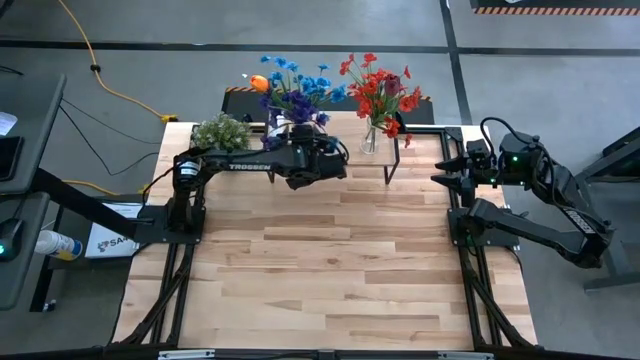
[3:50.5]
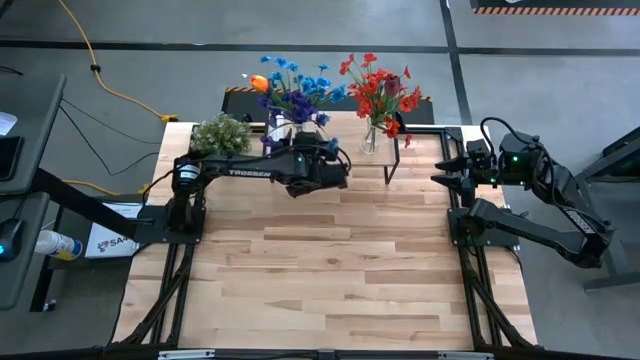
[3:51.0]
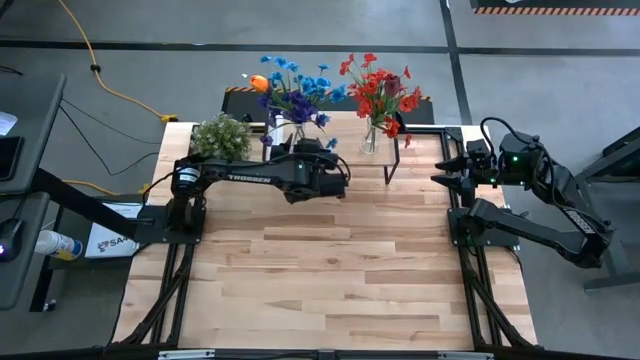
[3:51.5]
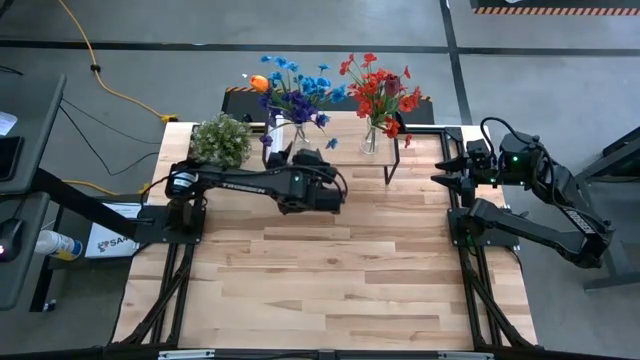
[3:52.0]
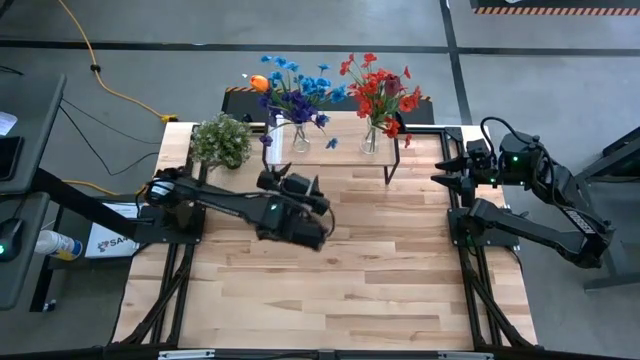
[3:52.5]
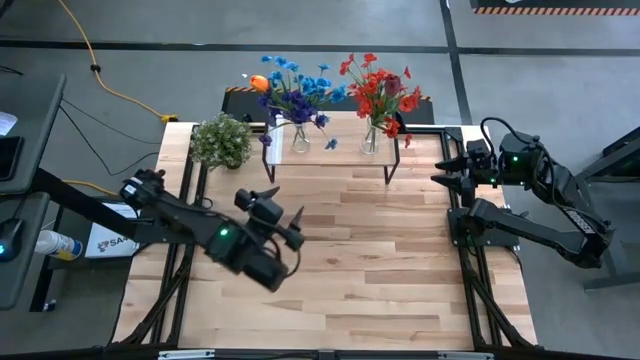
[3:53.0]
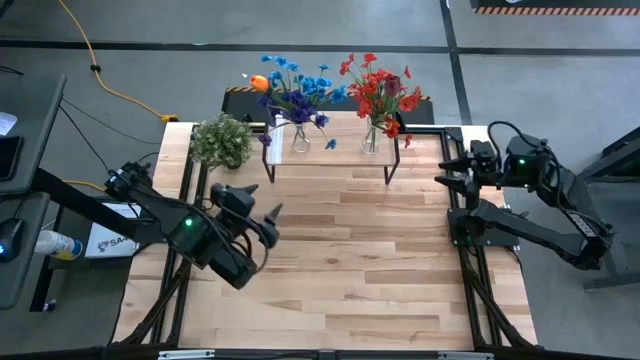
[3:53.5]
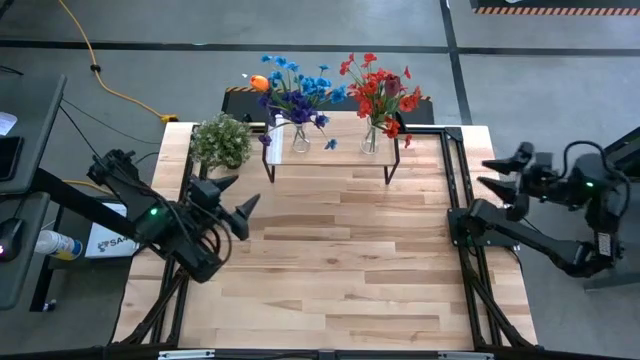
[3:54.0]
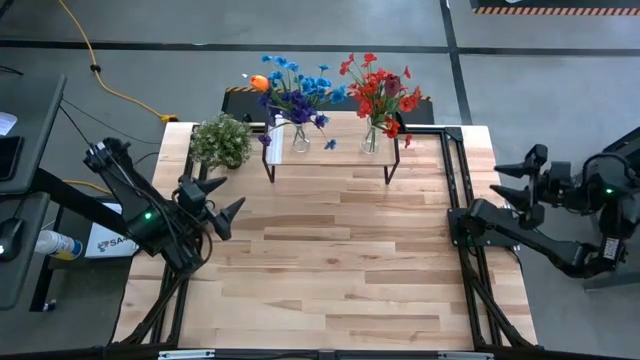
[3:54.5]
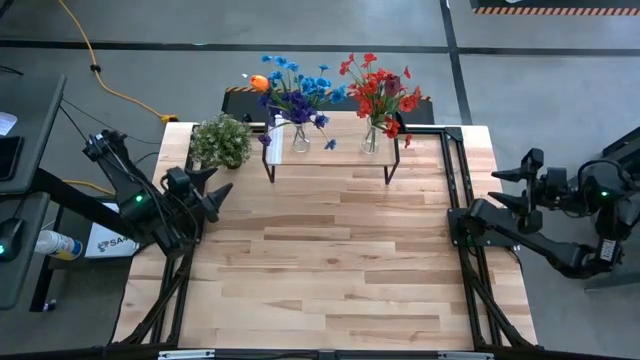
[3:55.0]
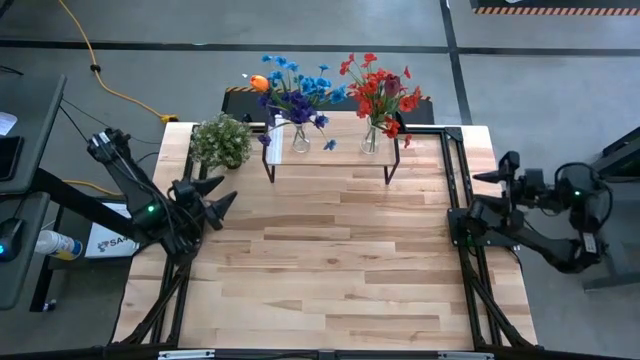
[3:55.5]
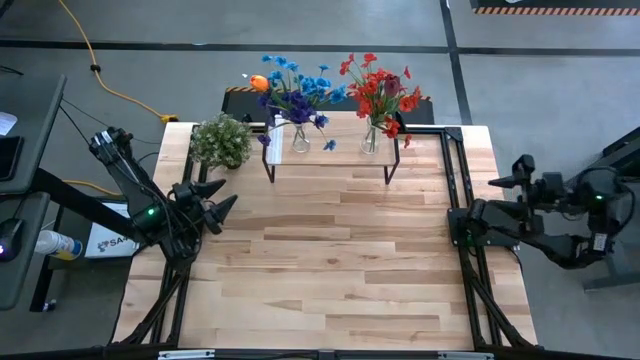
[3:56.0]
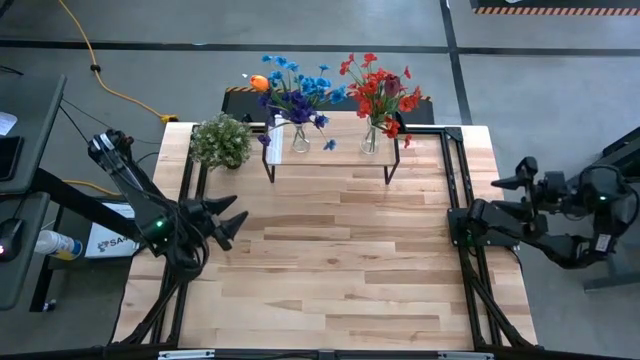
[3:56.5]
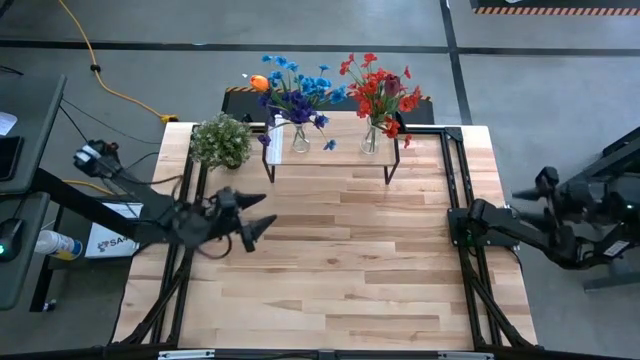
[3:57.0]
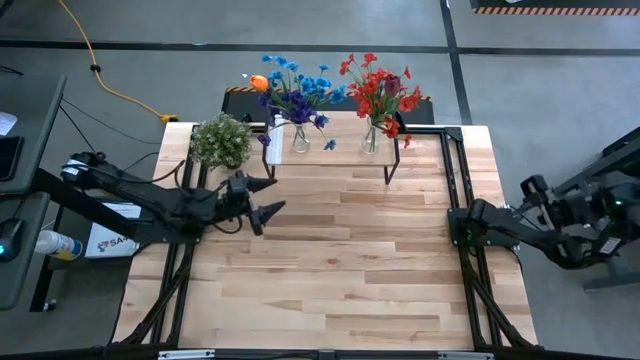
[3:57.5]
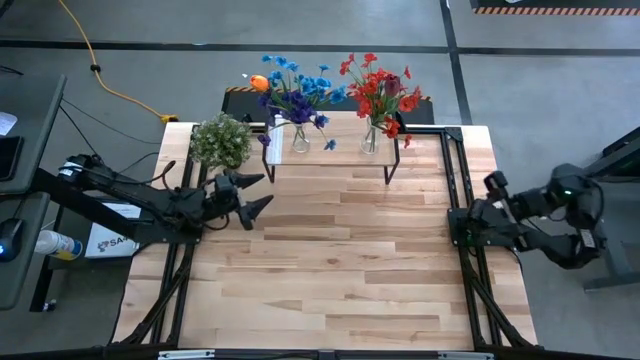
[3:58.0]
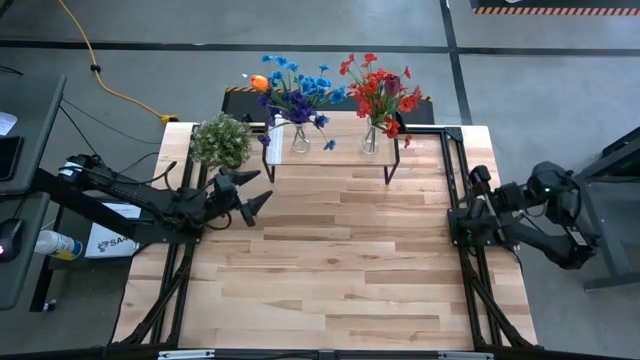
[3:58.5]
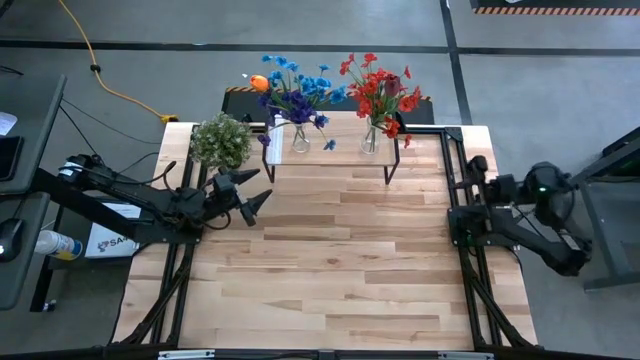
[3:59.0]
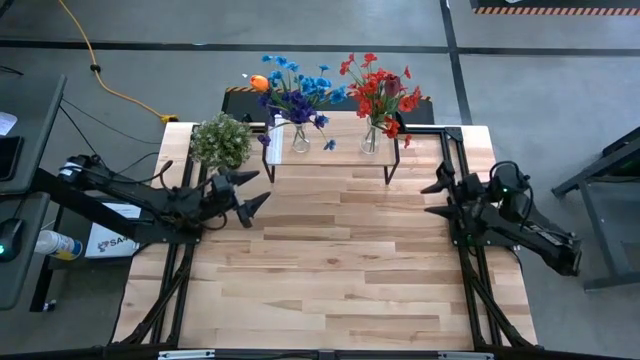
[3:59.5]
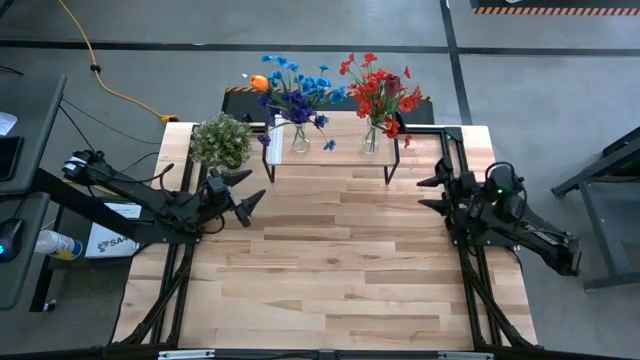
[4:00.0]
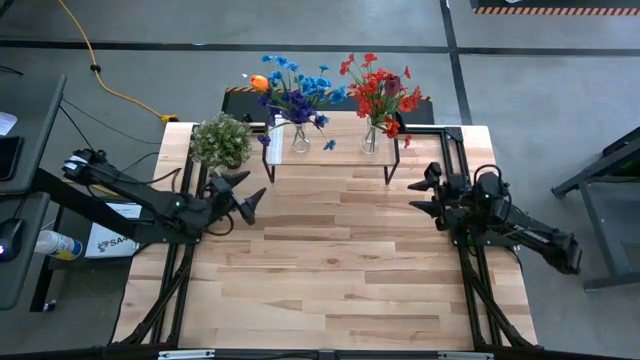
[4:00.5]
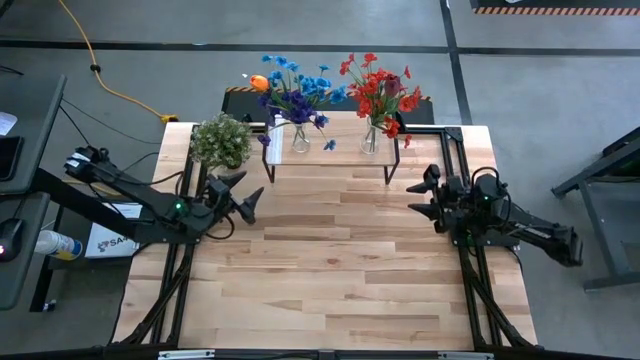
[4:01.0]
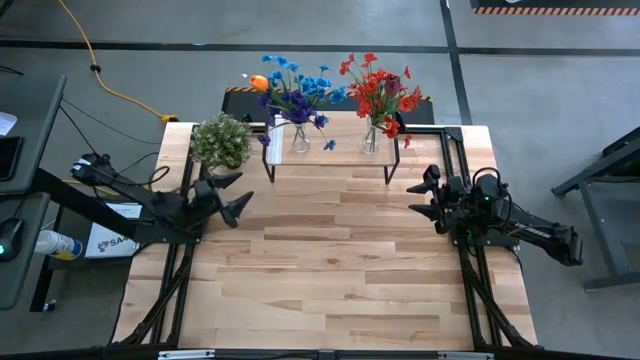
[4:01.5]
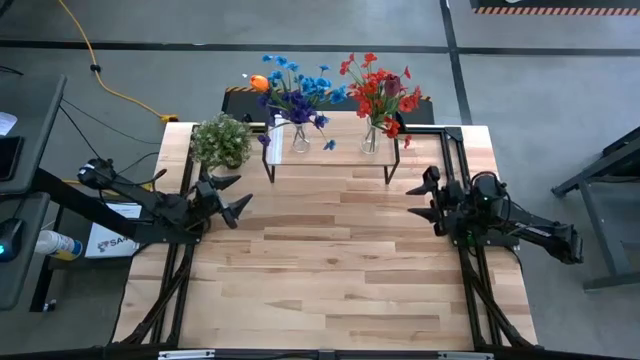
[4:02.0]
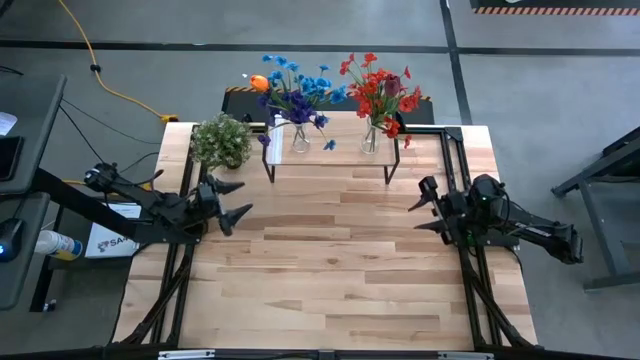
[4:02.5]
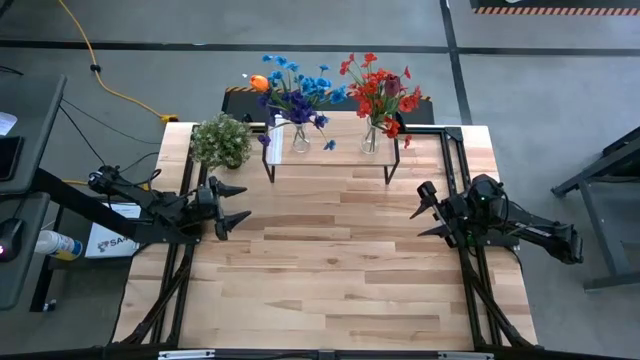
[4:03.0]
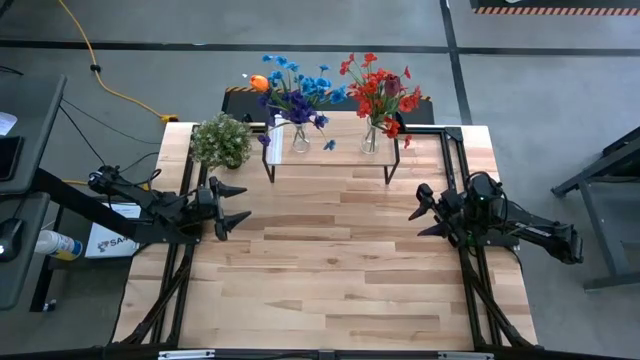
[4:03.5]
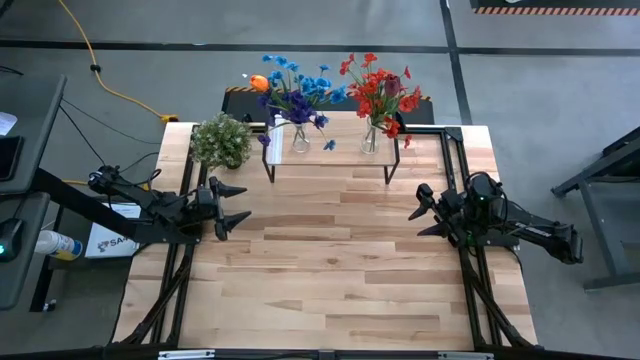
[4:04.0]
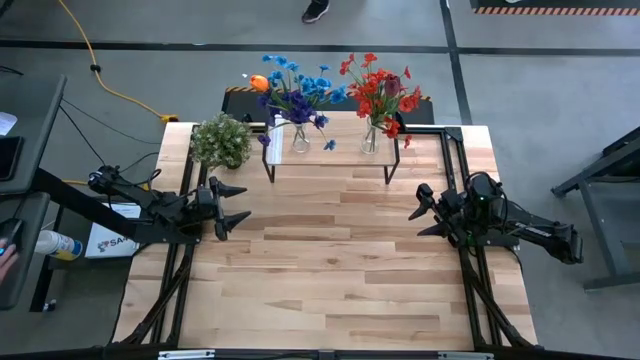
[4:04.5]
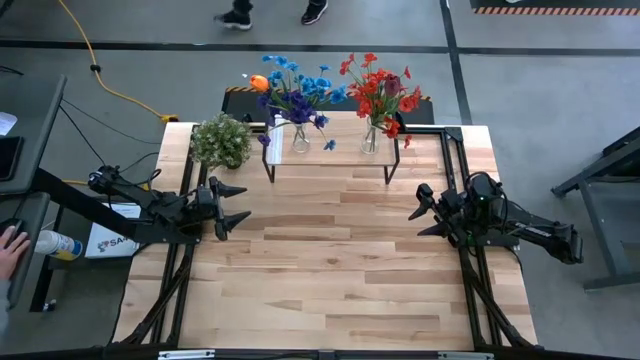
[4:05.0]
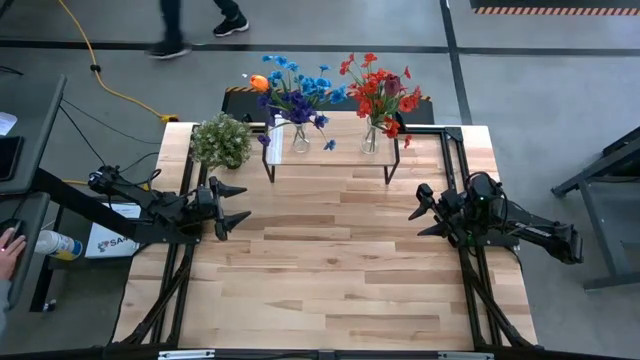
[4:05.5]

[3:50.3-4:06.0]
Task: Pick and place flowers into a vace then onto a shelf
Return to Home Position

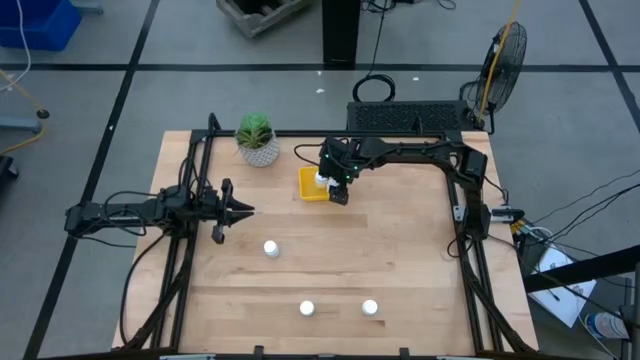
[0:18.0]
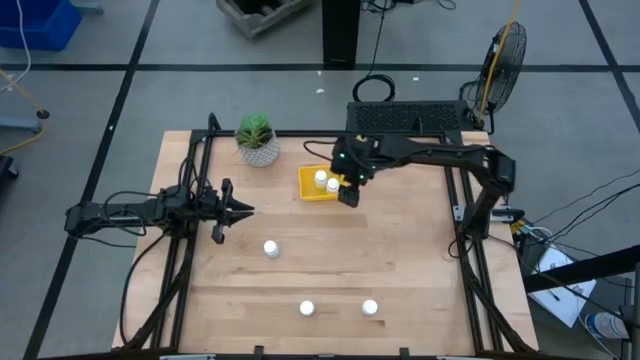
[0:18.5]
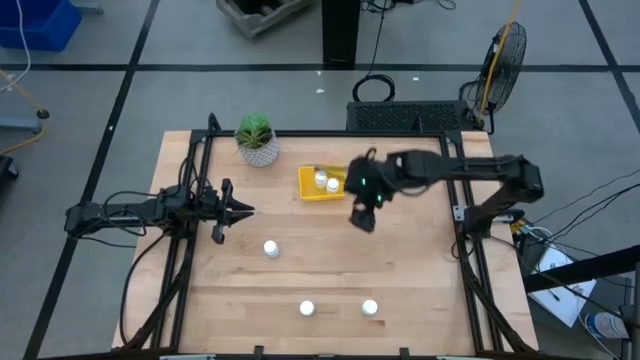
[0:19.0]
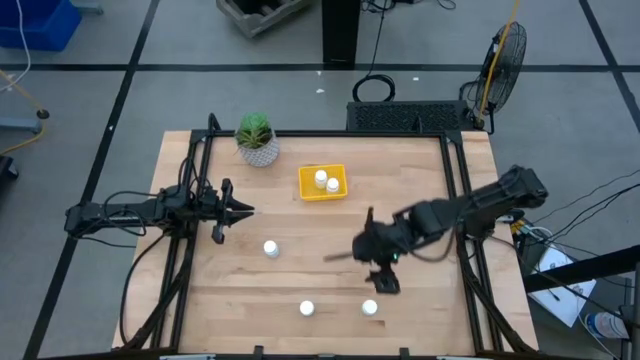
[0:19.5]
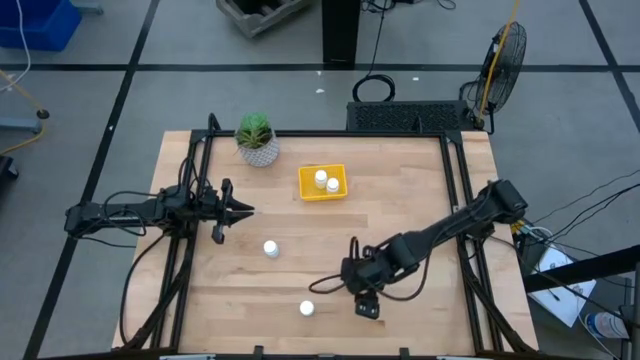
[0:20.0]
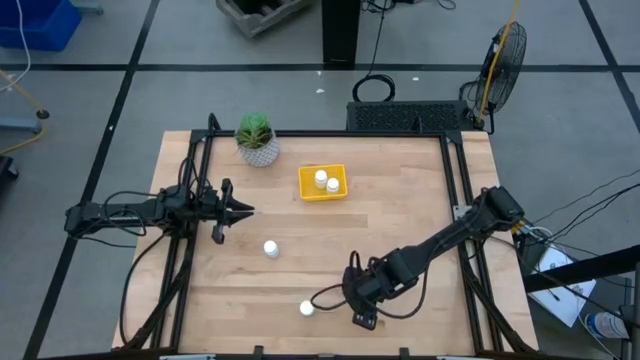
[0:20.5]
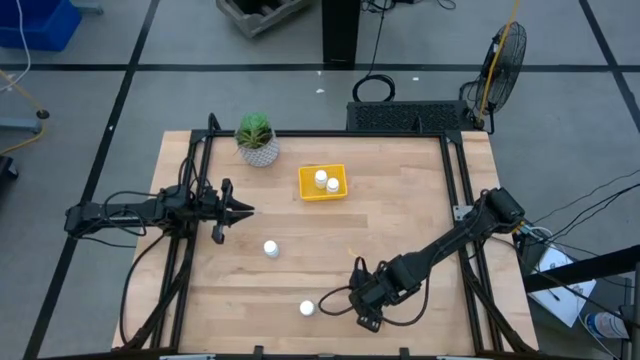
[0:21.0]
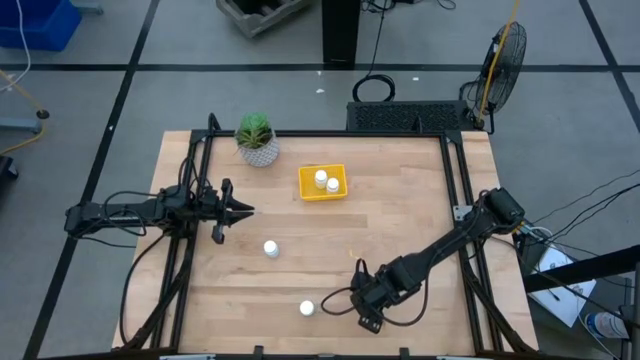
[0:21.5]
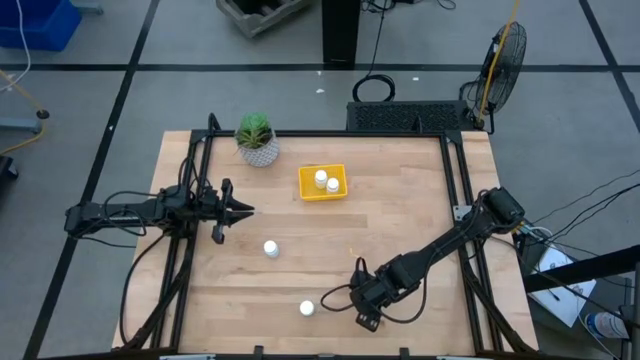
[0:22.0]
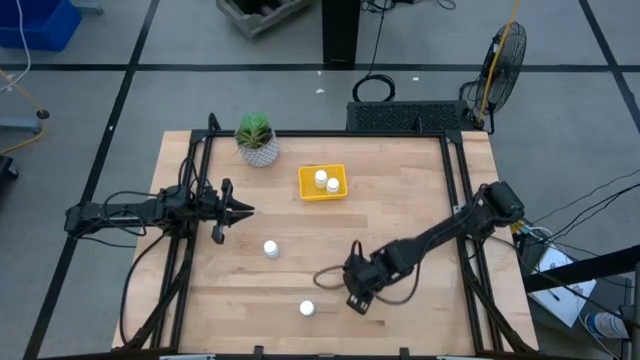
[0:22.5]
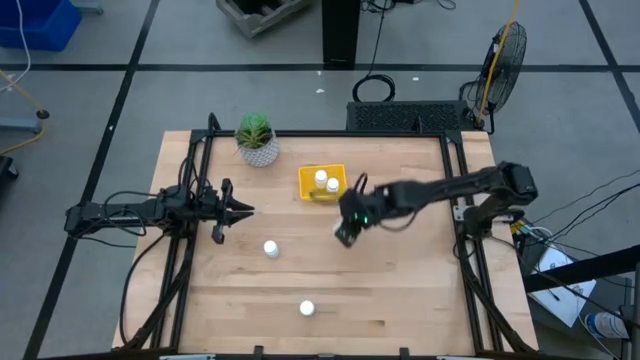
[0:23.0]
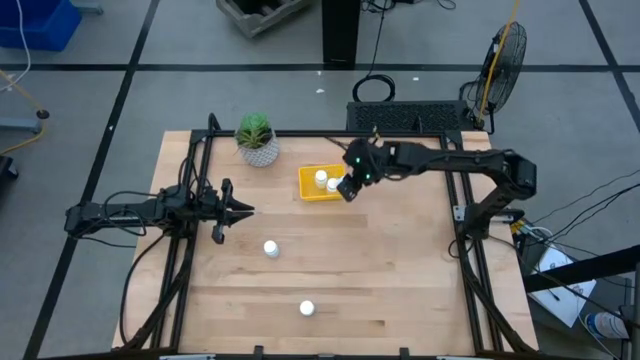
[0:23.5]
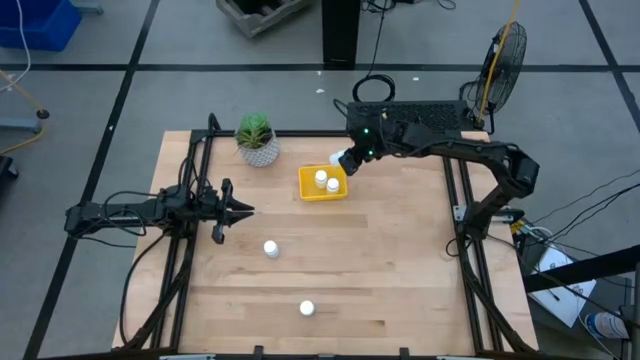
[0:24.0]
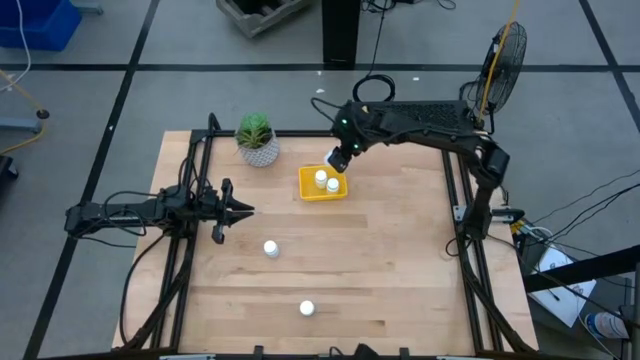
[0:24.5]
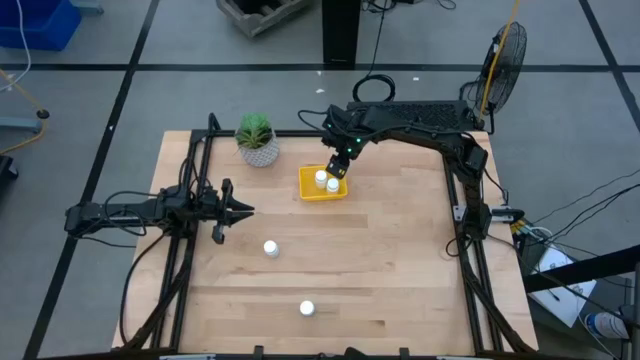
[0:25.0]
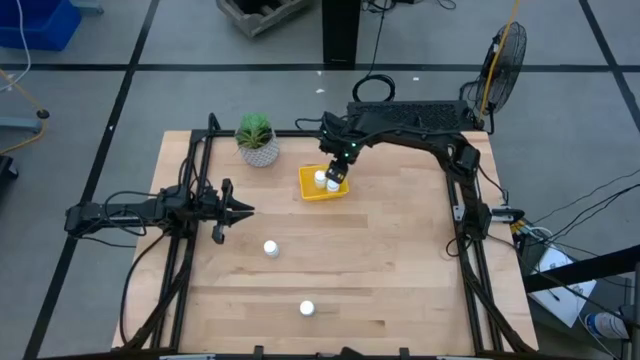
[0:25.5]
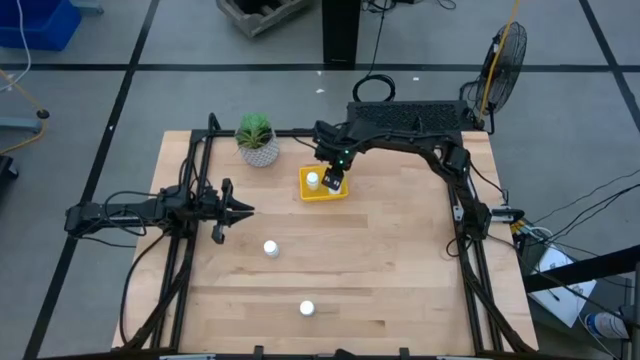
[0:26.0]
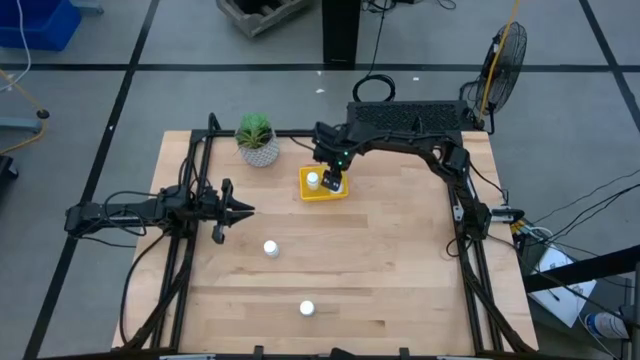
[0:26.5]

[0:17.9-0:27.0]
Task: Pick and place pill bottles into a basket
Put the bottom right white pill bottle into the yellow basket
